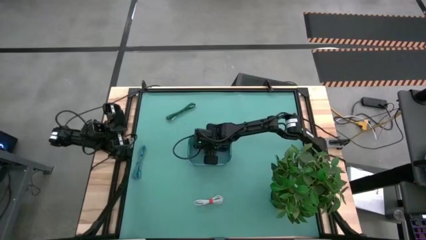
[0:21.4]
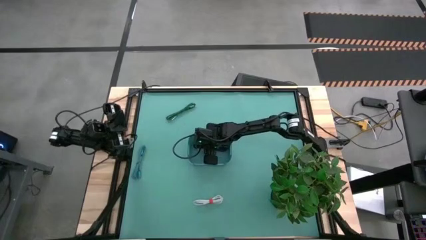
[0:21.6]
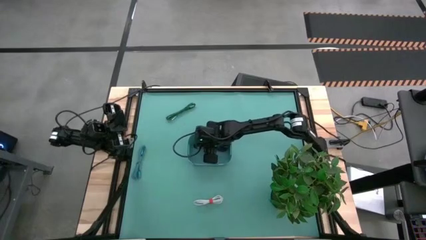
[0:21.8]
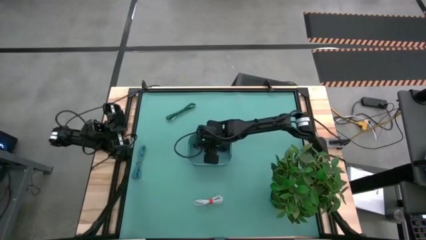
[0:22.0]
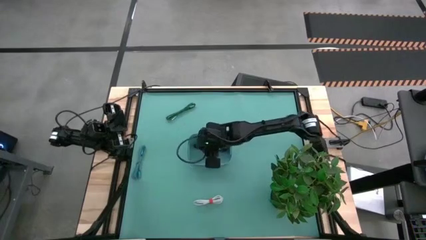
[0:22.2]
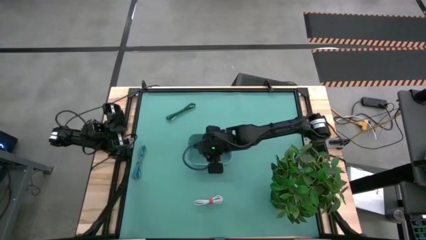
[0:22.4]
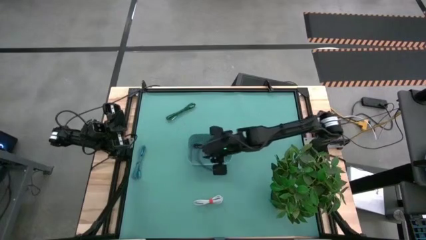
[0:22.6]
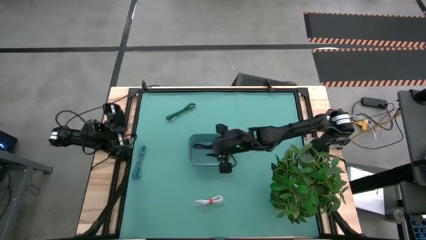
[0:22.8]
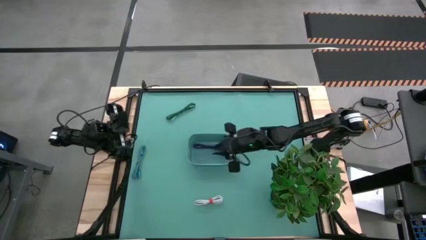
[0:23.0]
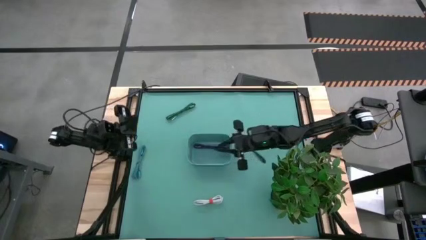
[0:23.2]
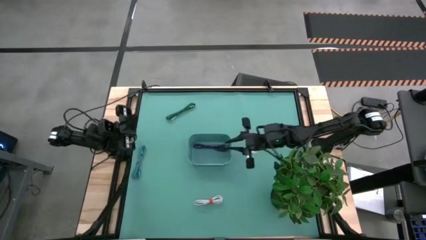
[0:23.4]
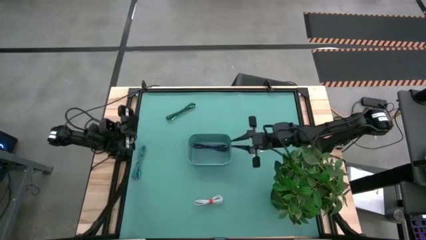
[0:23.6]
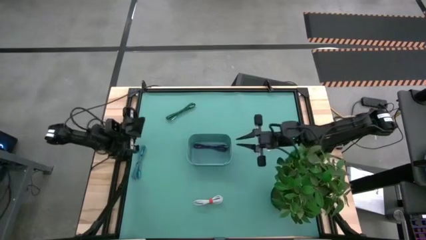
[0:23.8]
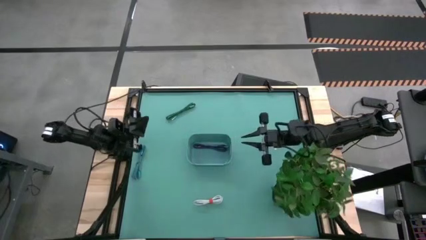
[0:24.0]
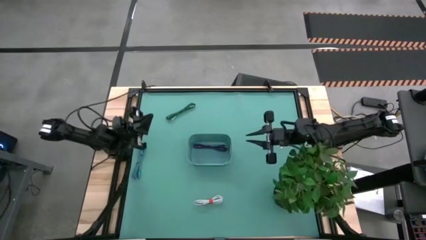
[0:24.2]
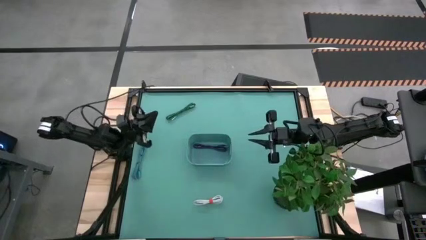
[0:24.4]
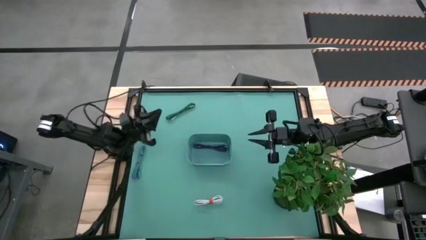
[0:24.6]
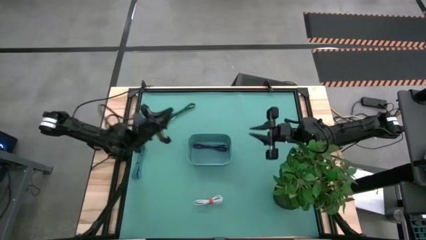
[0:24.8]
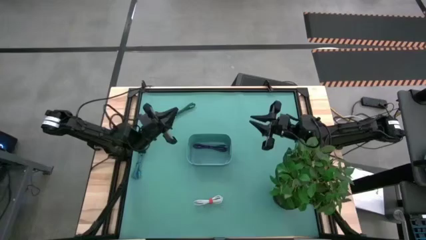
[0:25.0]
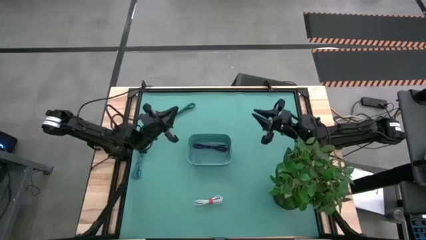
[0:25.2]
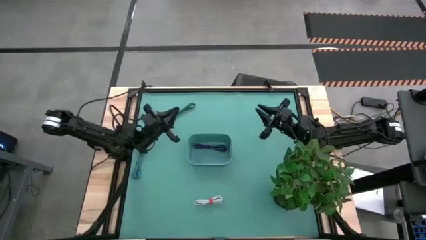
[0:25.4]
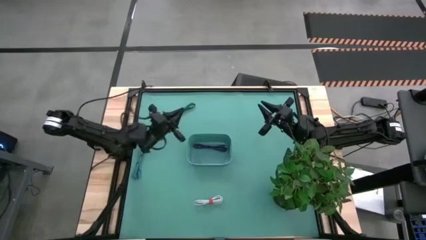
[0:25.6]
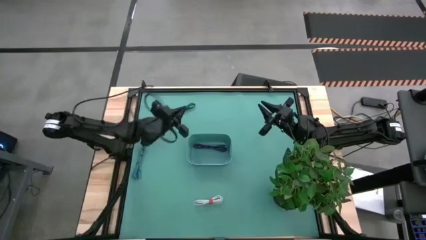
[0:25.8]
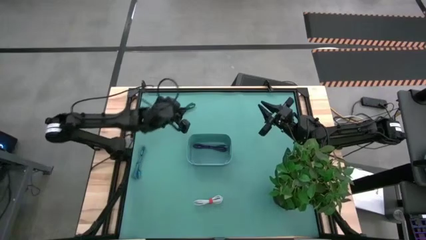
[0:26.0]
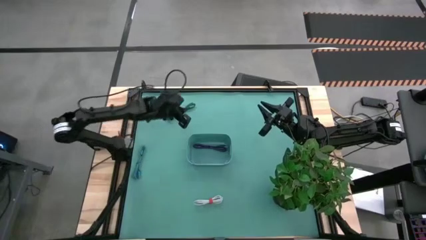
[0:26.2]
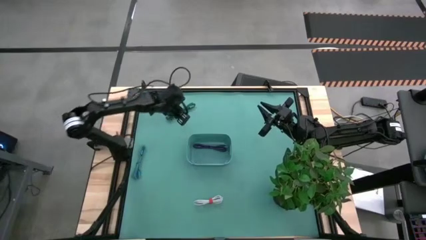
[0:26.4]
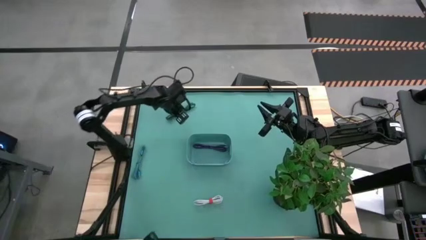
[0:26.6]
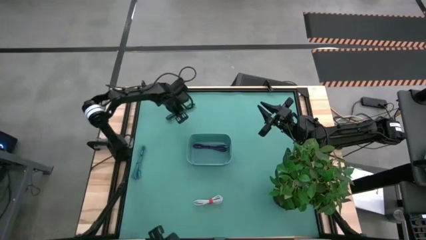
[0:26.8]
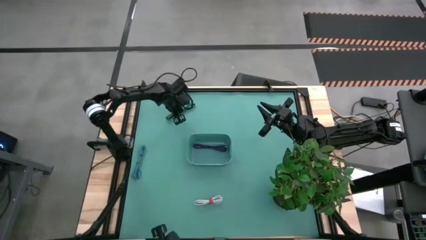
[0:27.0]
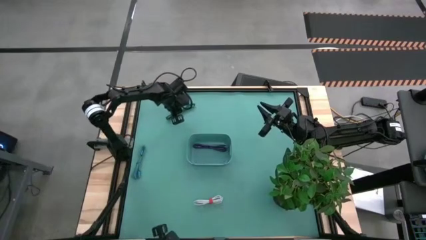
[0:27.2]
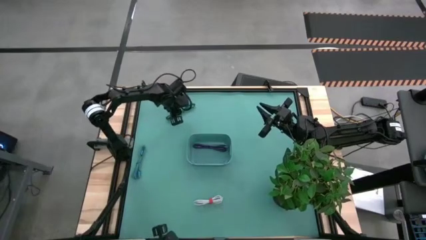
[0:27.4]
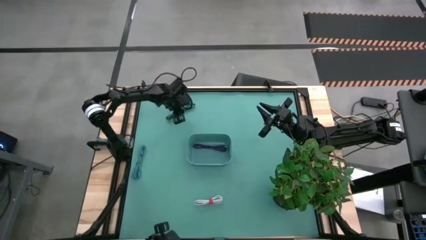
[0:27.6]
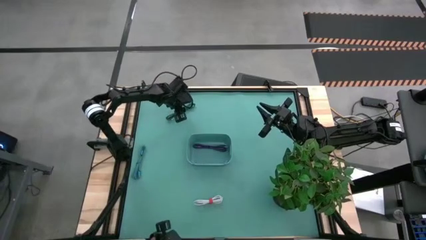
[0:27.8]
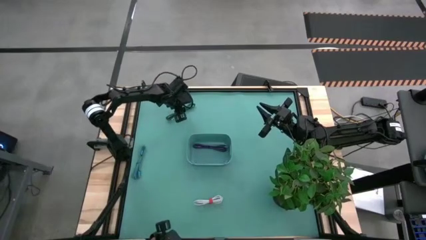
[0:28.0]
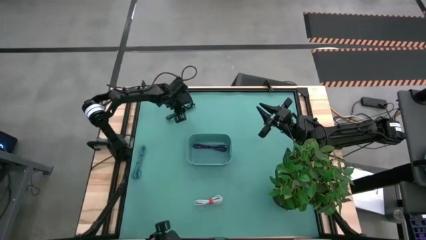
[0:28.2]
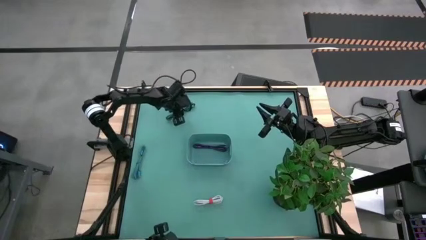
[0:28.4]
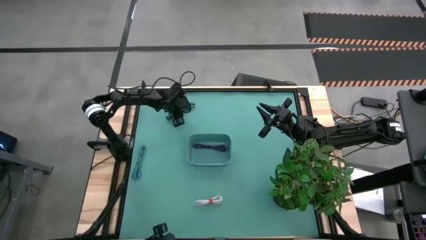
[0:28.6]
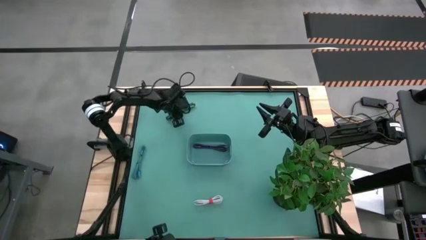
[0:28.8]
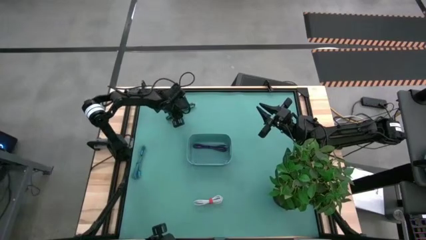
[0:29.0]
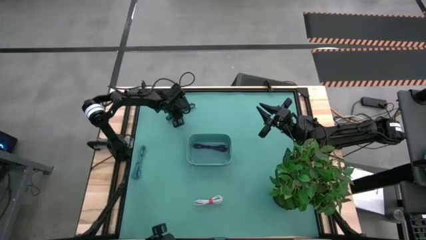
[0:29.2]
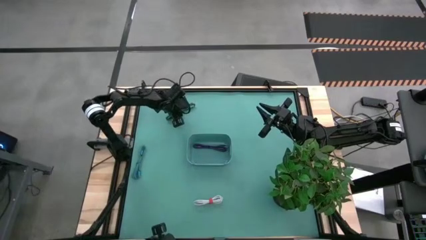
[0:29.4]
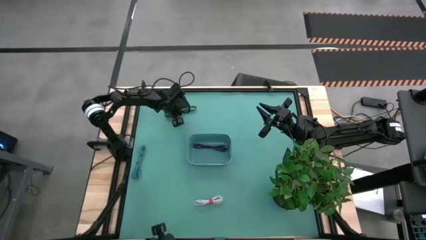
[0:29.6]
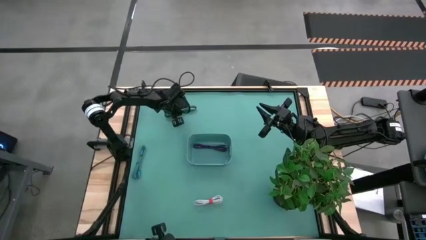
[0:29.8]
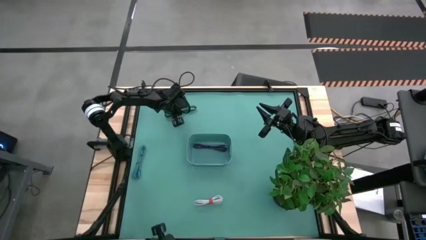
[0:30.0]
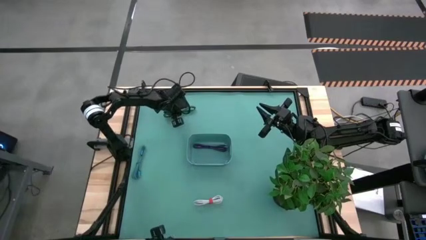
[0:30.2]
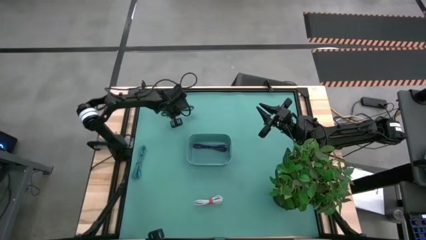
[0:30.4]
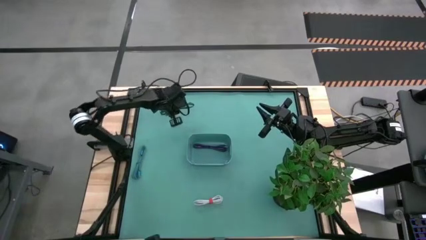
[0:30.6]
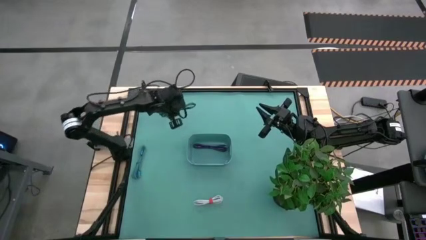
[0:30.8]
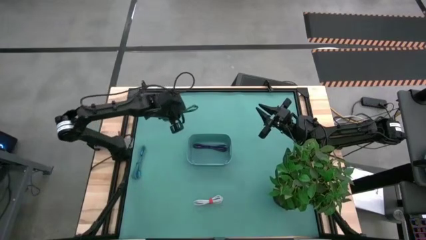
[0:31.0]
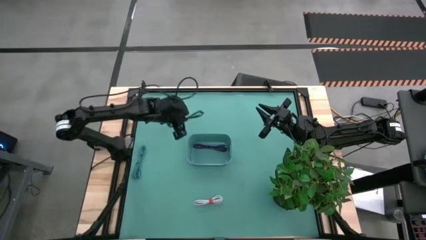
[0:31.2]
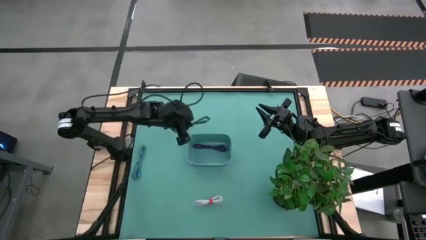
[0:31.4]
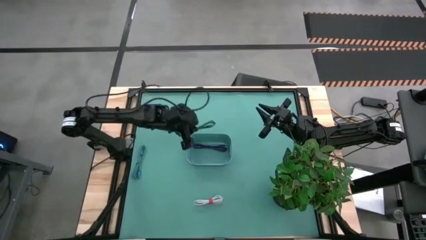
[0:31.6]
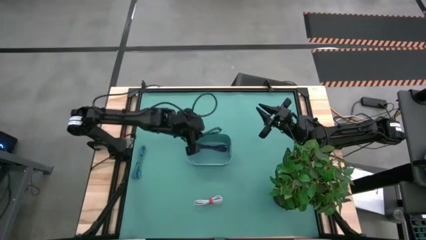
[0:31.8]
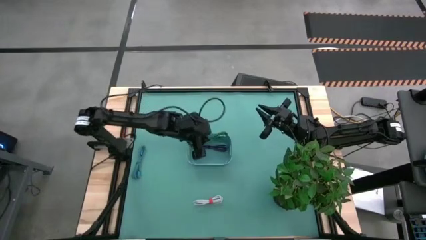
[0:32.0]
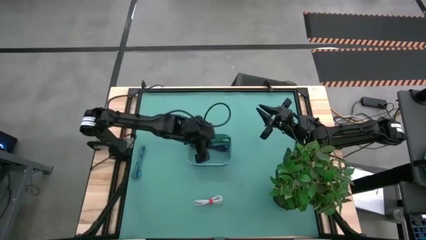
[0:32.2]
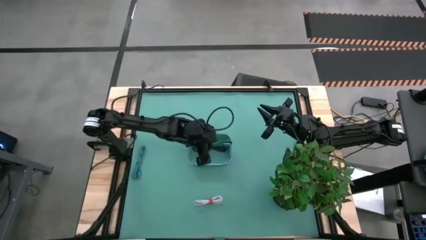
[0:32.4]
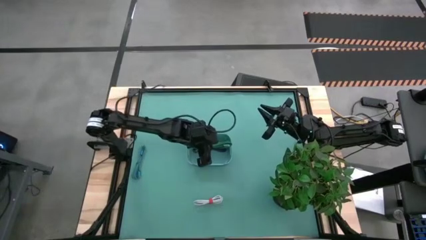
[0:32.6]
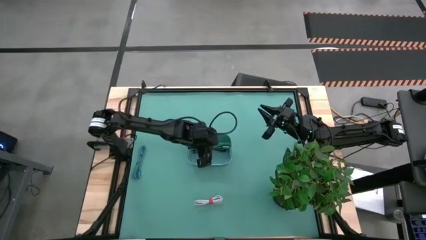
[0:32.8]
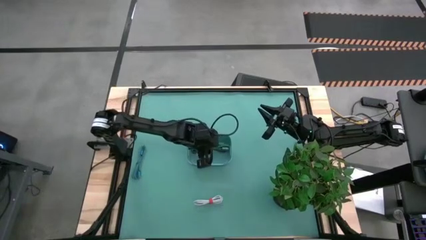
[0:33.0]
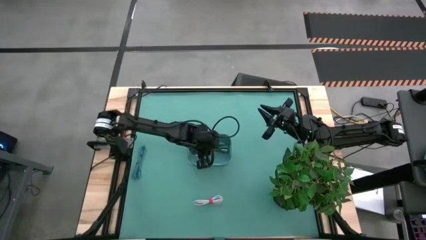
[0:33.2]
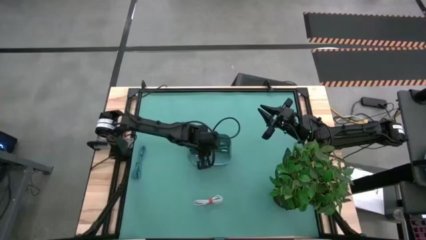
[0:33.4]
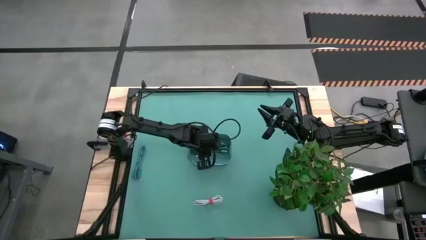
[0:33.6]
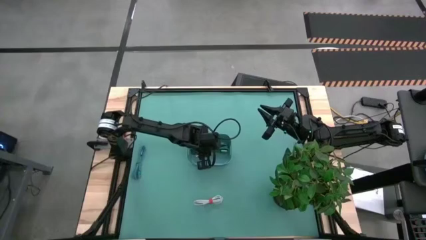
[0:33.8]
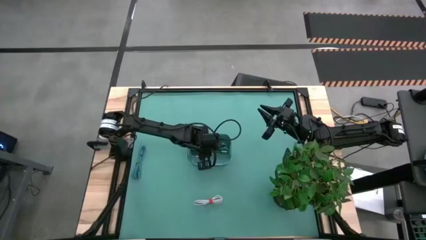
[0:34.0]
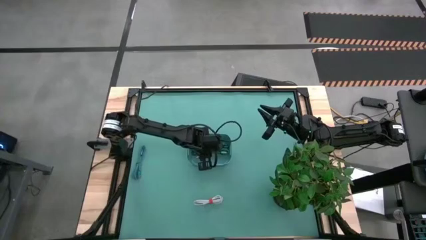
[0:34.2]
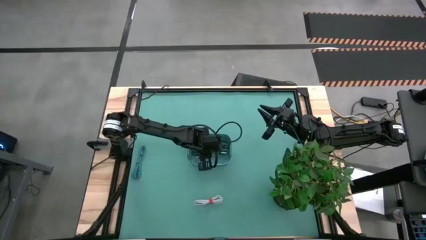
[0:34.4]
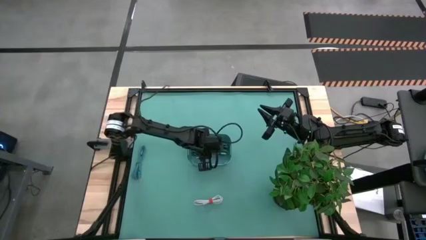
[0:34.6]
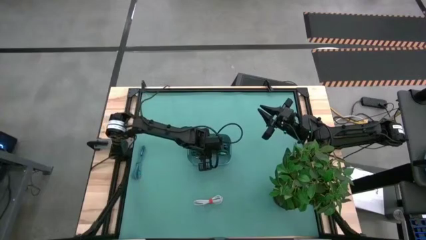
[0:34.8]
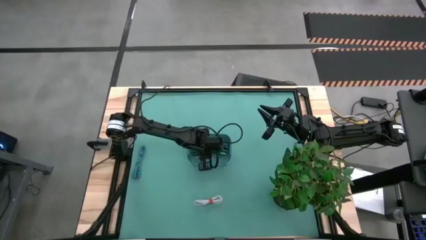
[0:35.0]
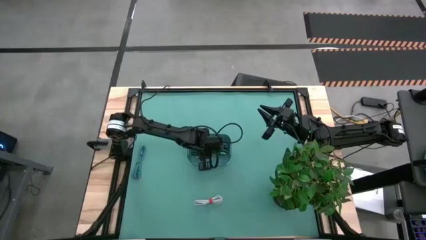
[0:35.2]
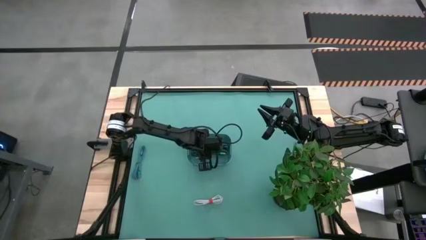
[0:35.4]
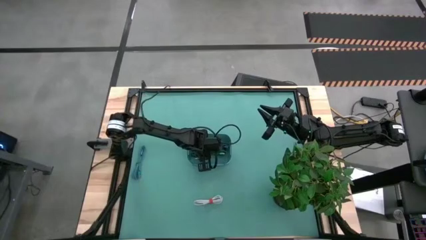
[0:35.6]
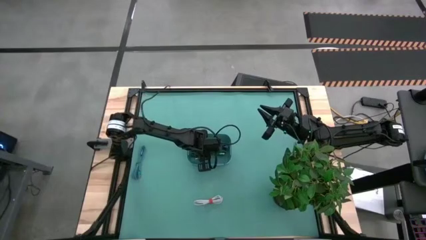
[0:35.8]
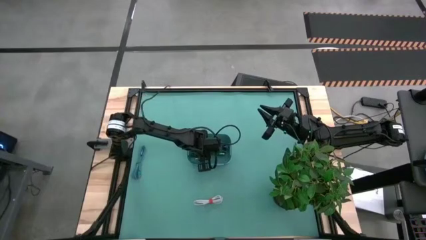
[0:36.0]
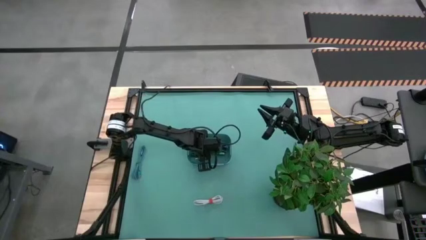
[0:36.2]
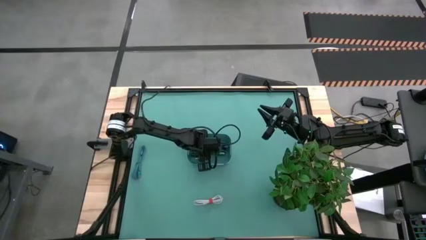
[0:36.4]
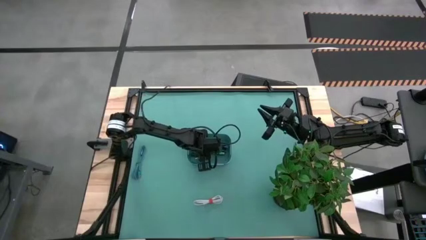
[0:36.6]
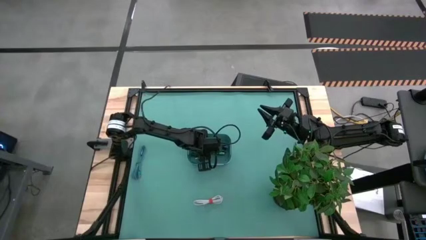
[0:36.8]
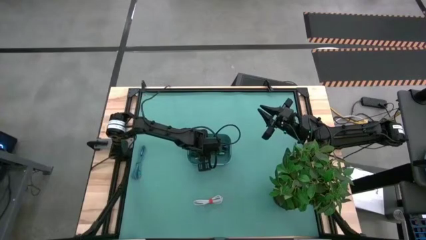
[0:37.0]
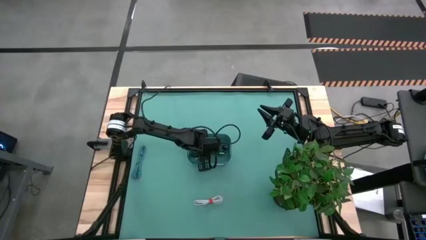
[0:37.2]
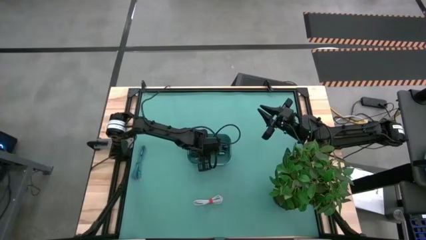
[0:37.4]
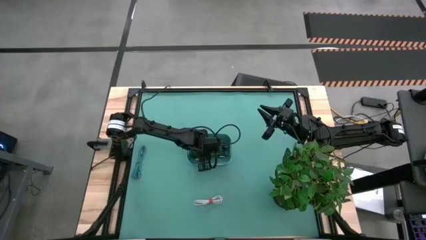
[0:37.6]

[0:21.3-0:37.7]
Task: Pick and place USB-C Cables
Put the green charger cable into the green bin
